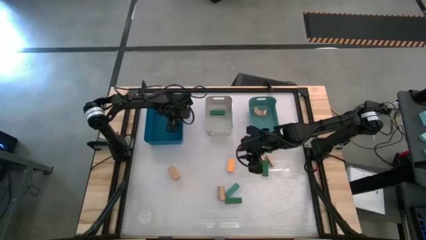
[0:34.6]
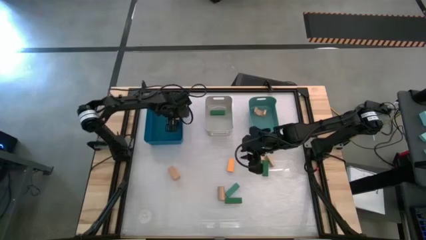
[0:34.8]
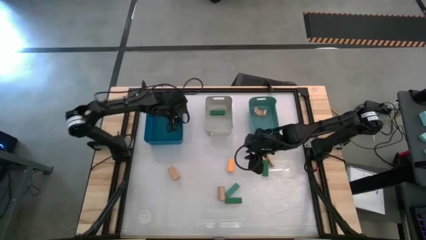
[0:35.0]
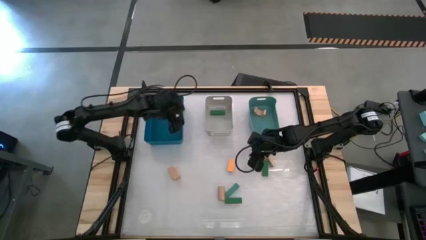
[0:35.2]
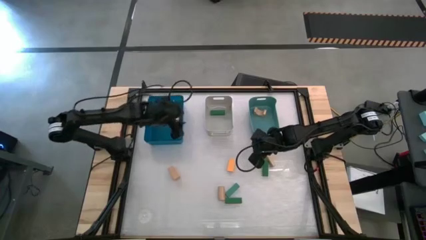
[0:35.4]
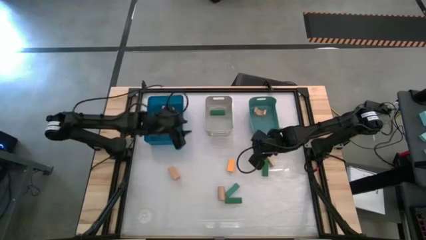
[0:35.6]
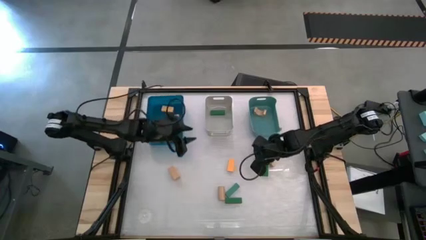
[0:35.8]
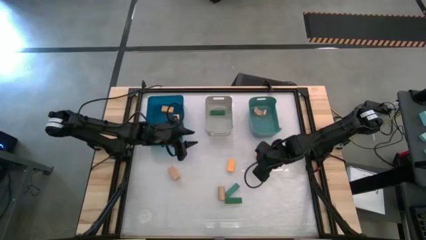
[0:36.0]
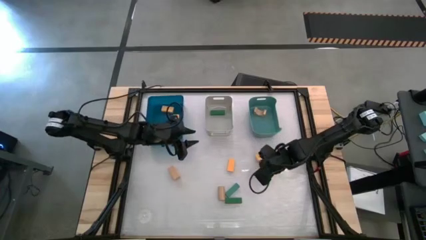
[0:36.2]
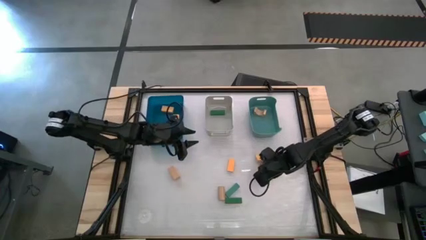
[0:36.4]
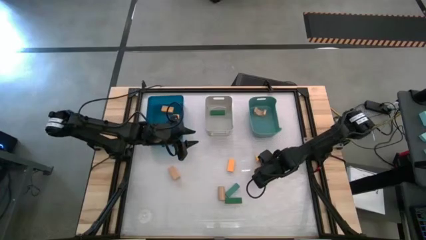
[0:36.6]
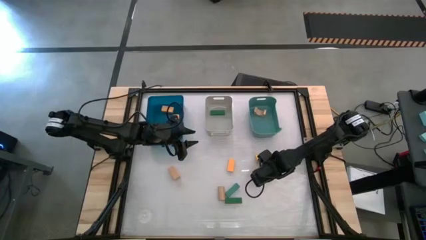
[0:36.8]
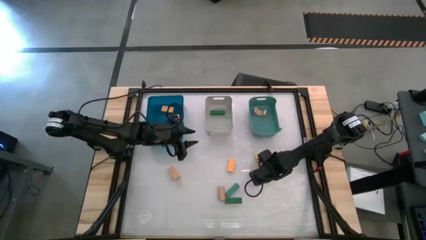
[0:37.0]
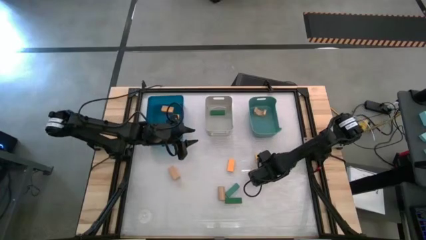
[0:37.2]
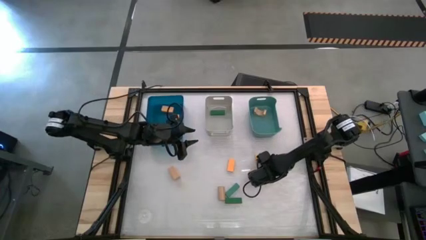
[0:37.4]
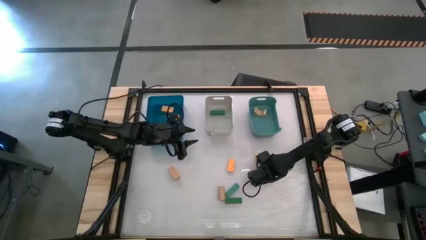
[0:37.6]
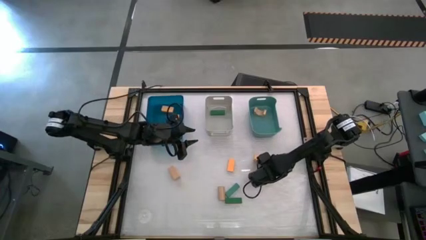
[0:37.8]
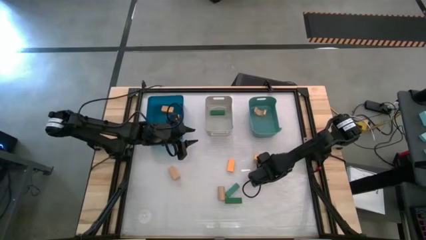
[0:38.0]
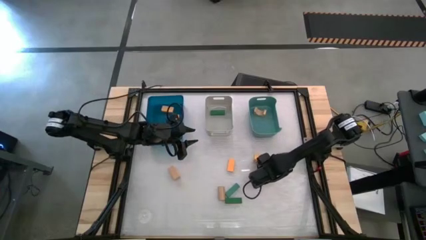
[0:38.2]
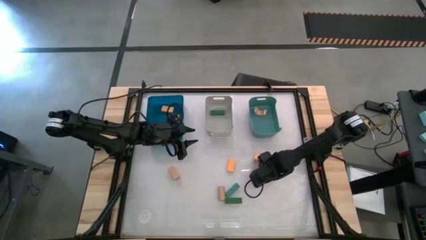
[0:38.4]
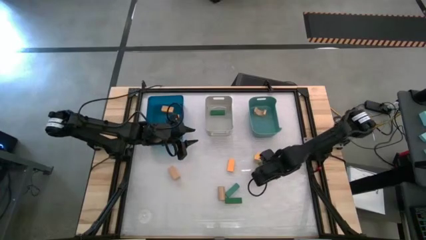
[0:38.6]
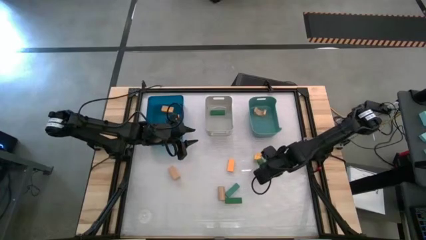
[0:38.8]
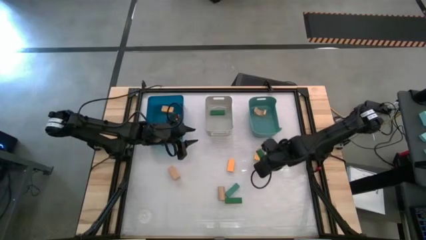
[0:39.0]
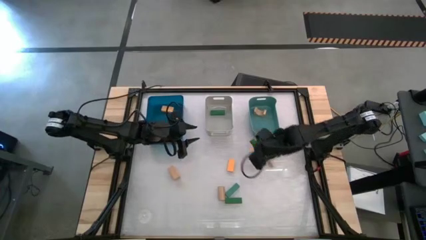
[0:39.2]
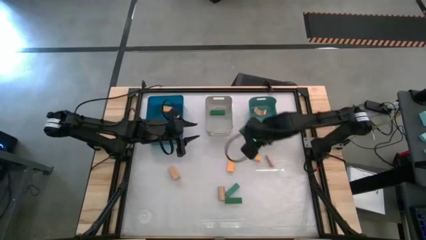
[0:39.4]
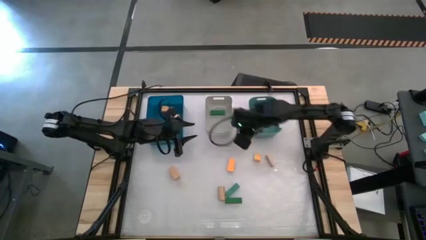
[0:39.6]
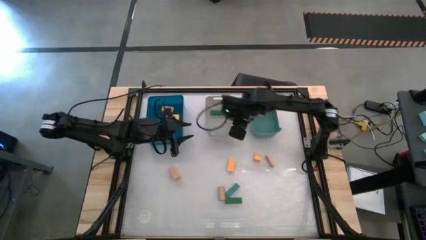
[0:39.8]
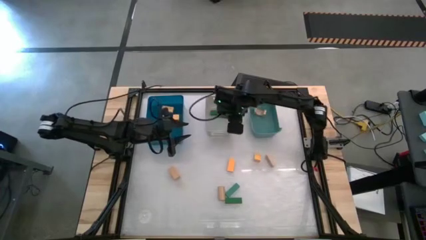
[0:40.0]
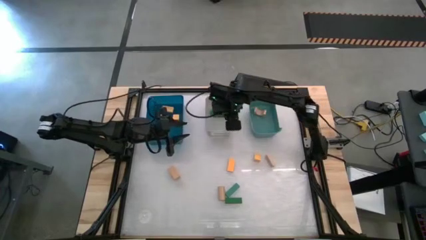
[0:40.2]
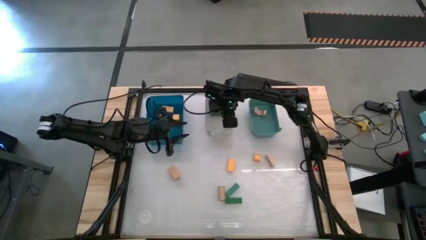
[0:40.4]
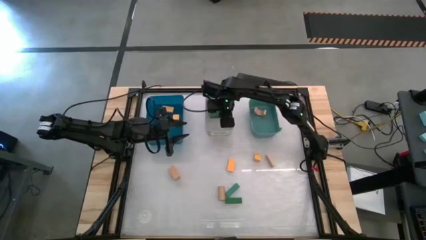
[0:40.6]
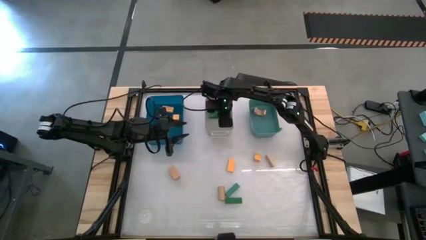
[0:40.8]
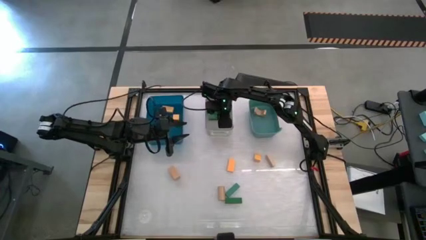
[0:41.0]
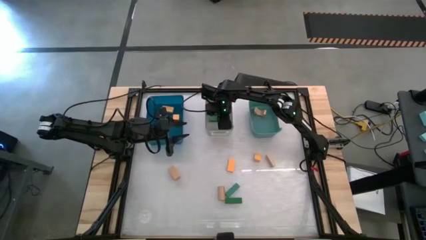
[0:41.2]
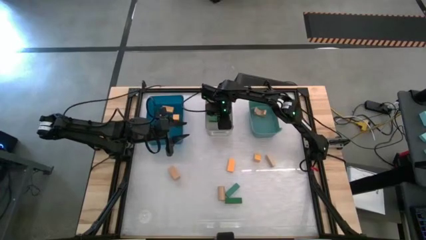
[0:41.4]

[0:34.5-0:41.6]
Task: Sort & place blocks by color
Put the green block into the gray bin

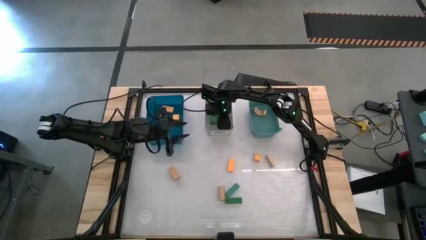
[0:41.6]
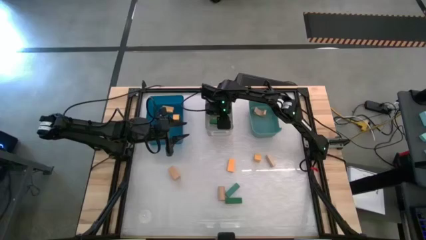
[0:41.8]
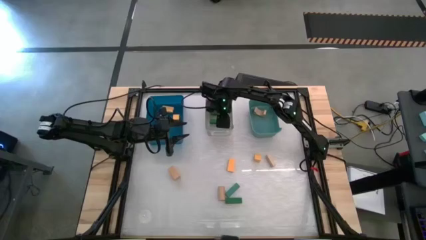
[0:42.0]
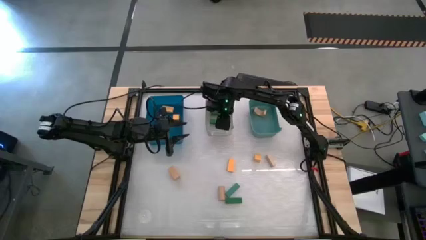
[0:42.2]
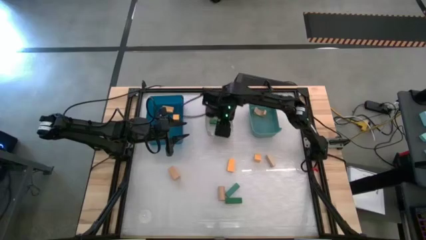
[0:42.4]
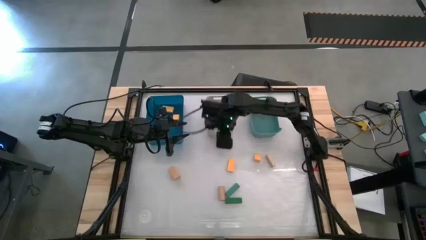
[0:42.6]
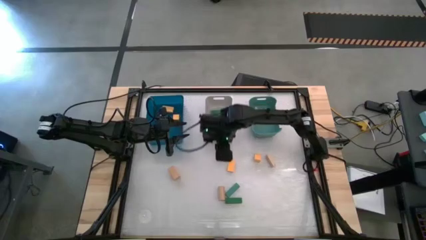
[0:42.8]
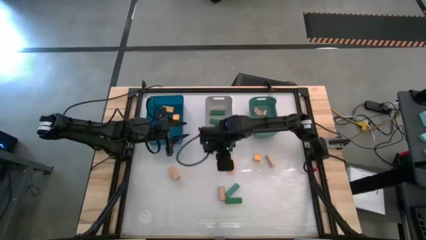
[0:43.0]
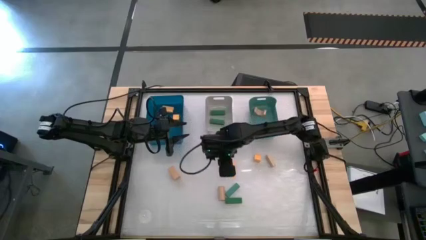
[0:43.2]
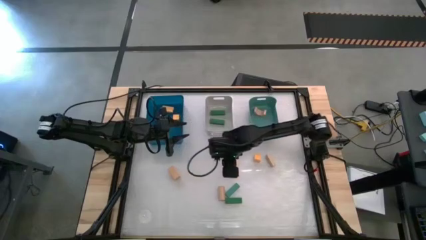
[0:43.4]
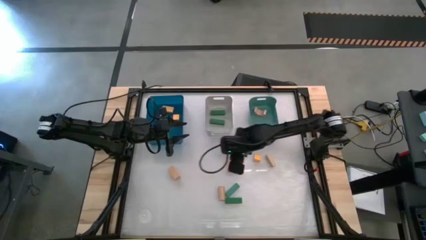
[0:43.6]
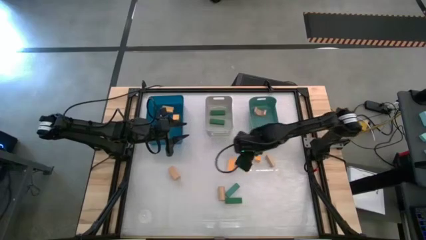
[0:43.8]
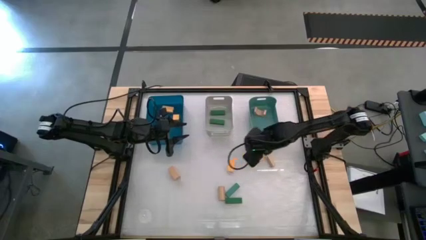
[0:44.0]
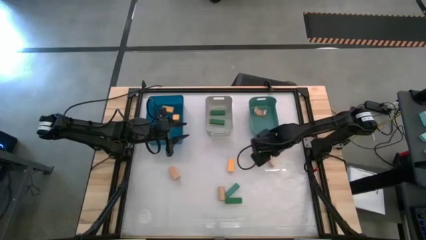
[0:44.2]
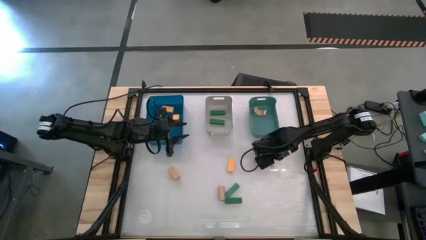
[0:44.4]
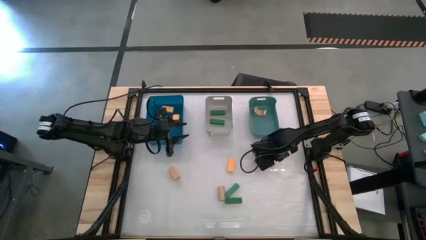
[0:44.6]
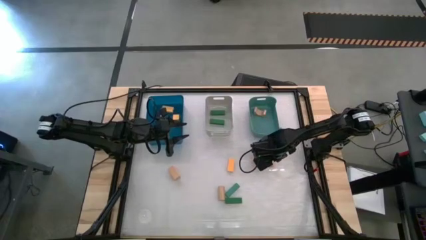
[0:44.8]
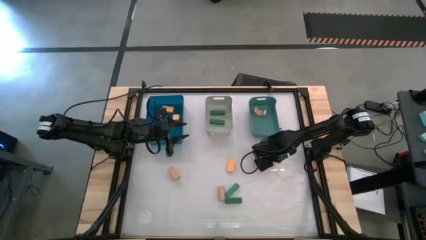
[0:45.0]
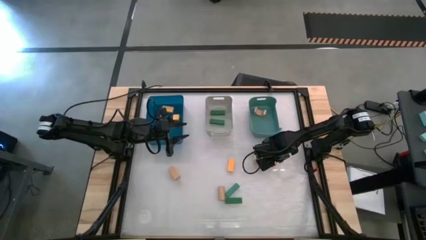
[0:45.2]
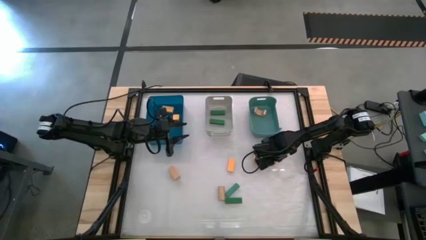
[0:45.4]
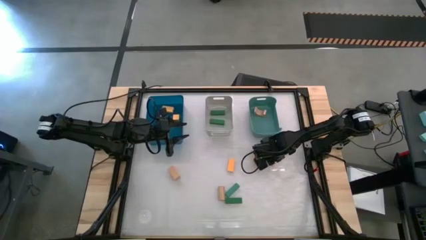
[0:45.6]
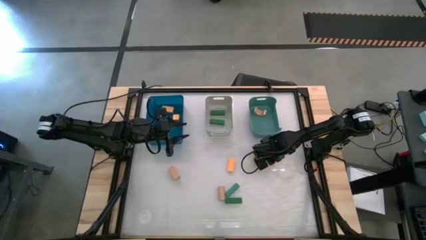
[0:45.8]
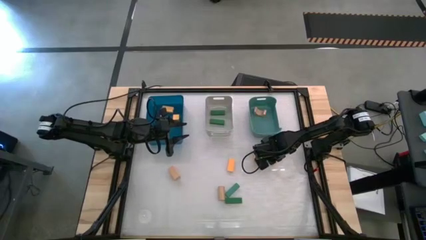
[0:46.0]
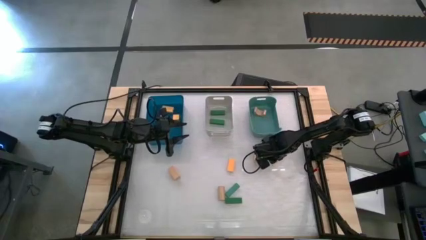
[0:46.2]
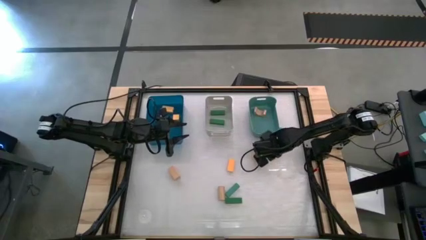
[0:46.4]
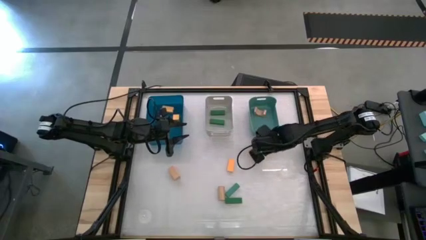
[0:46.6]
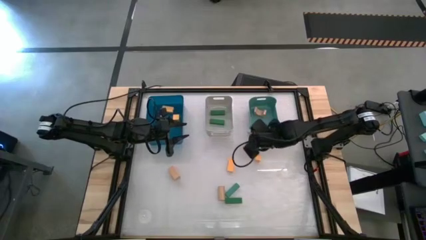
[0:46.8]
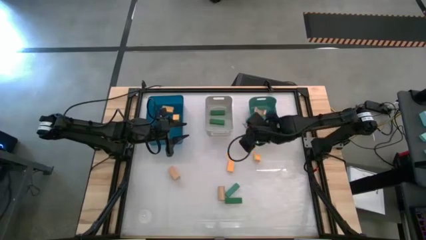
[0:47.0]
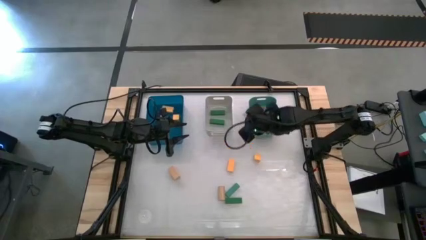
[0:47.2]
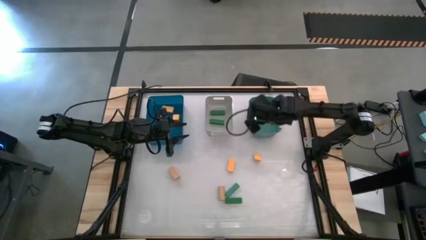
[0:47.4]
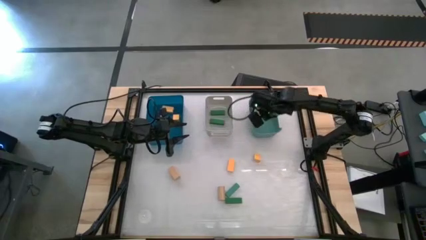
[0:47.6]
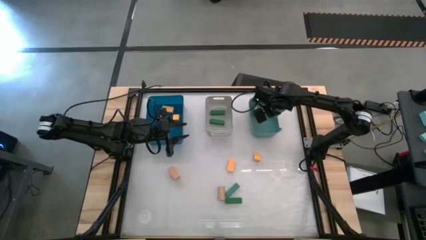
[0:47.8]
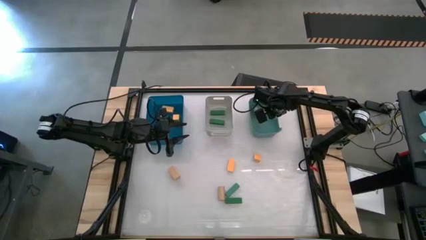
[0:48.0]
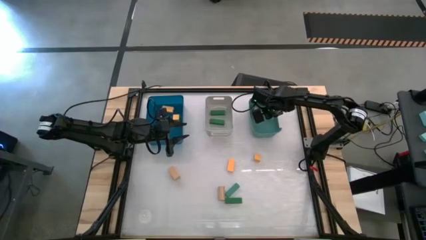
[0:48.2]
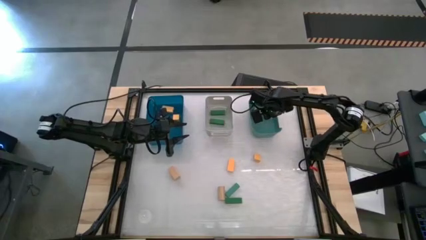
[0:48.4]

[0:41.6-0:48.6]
Put the brown block into the green bin

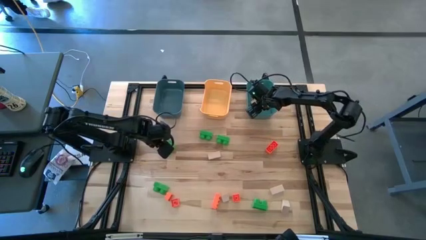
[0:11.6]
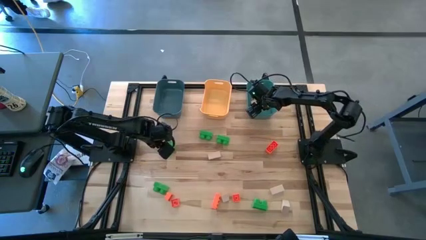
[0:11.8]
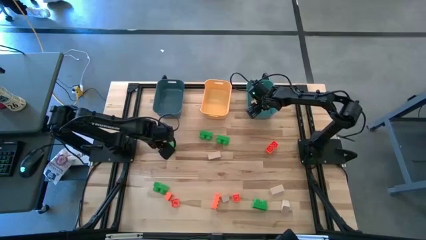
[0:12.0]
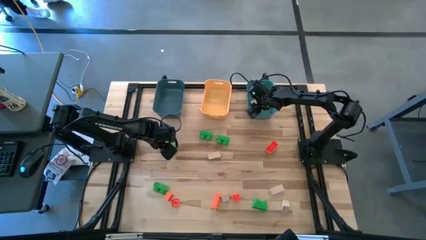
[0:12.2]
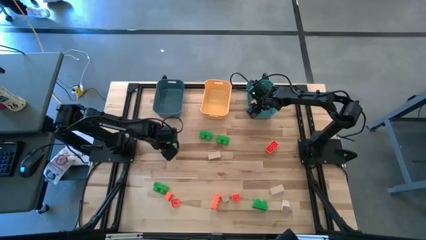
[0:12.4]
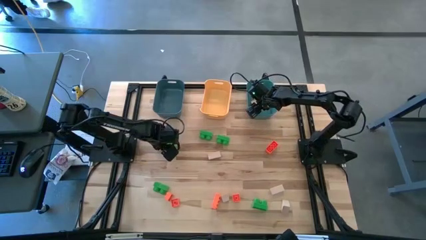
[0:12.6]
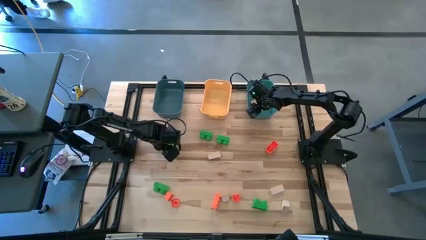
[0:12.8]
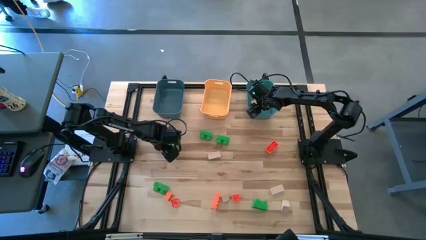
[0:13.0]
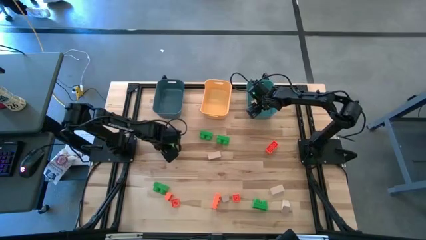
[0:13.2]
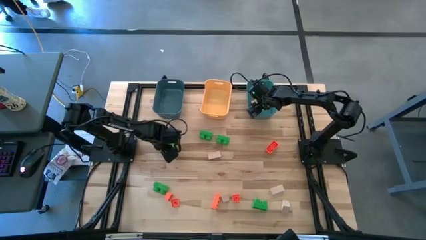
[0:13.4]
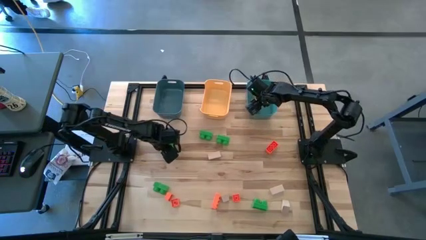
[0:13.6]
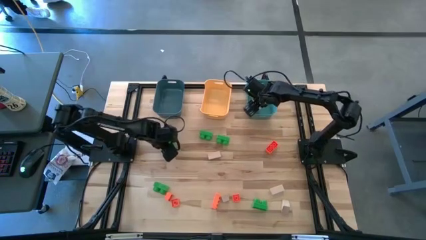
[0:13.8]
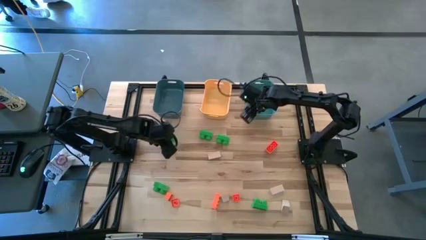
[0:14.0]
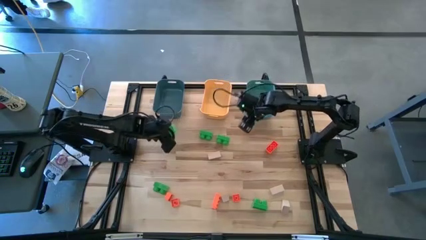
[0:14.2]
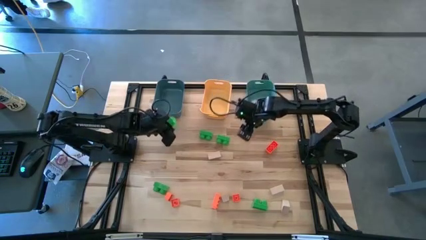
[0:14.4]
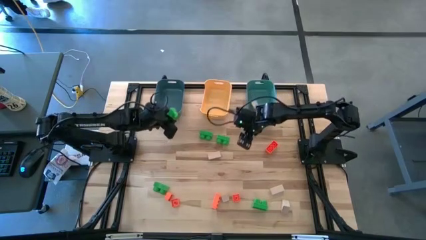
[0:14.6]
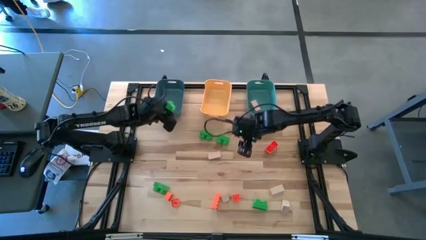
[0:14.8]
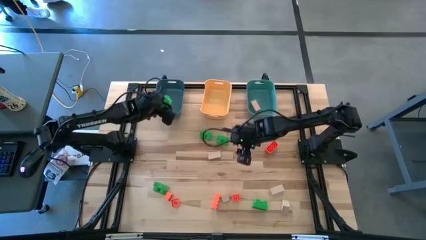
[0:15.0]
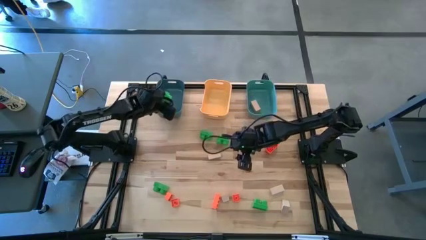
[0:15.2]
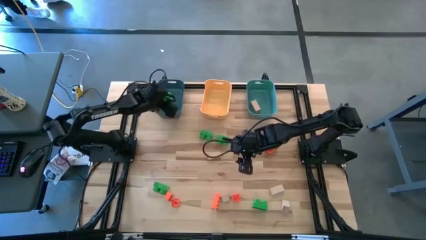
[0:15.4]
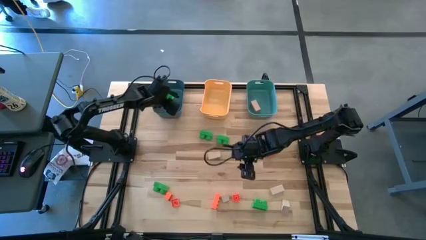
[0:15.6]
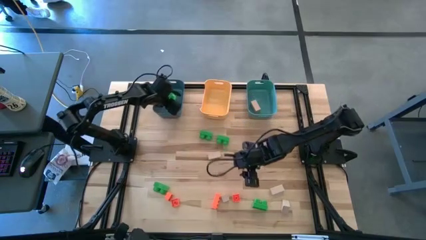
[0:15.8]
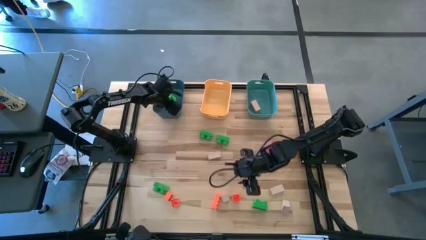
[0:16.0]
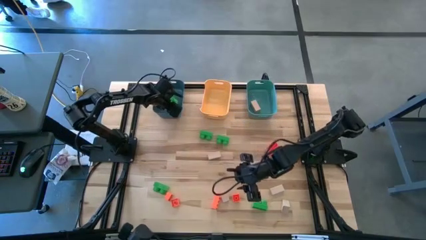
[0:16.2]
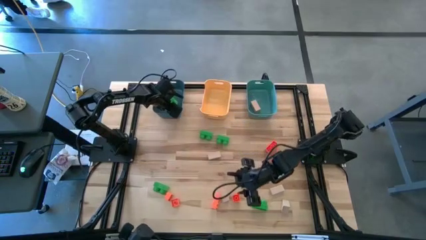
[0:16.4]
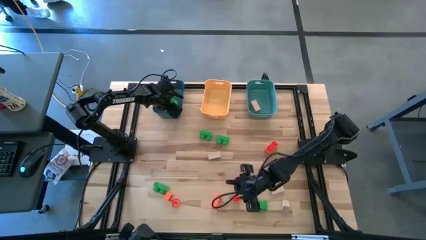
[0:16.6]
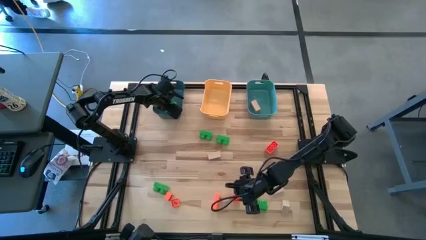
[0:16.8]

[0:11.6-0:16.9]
Task: Sort & place blocks by color
Put the green game piece into the blue bin
